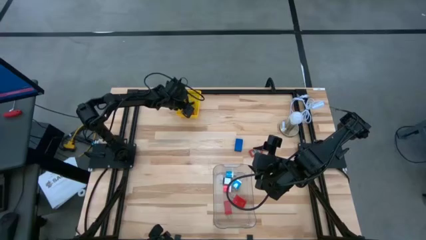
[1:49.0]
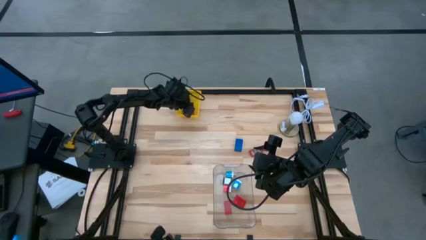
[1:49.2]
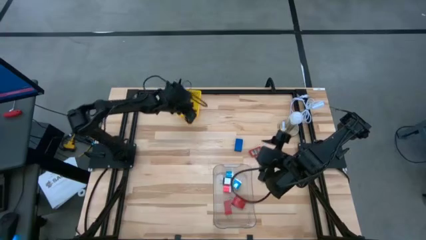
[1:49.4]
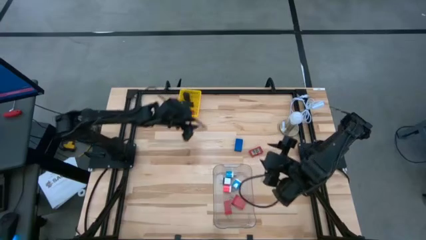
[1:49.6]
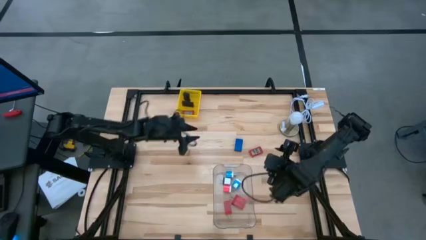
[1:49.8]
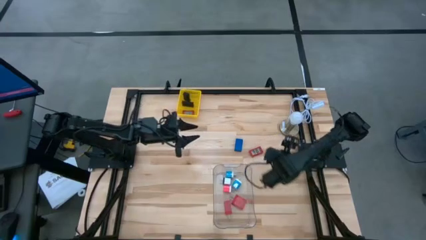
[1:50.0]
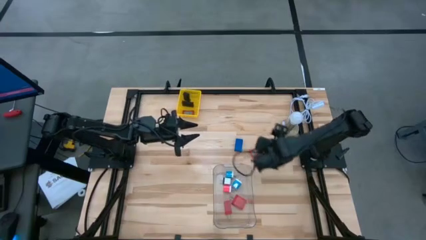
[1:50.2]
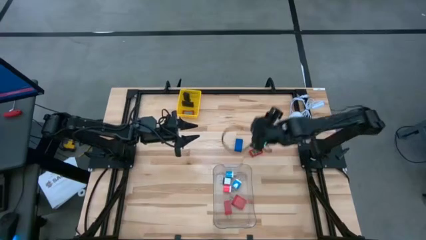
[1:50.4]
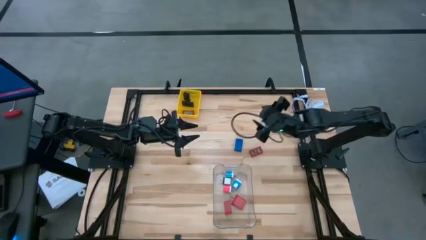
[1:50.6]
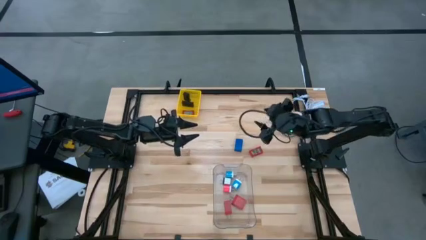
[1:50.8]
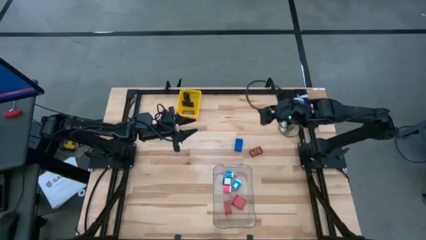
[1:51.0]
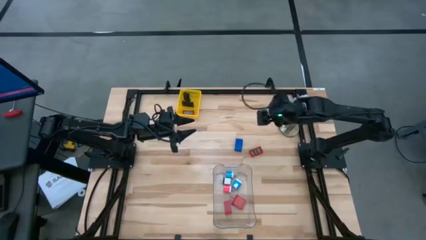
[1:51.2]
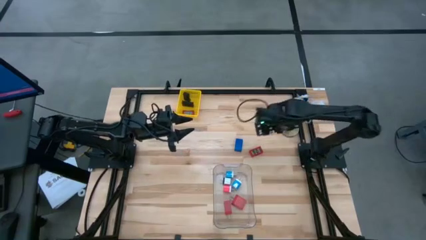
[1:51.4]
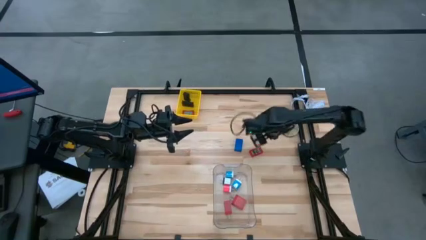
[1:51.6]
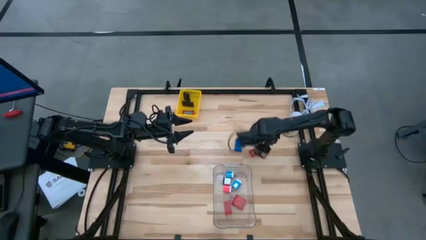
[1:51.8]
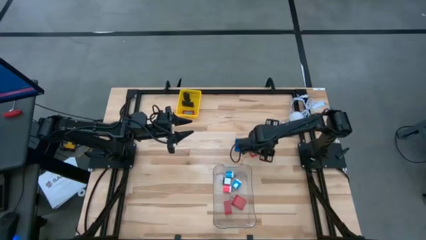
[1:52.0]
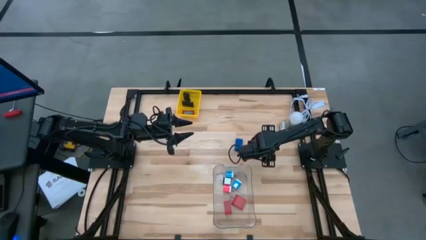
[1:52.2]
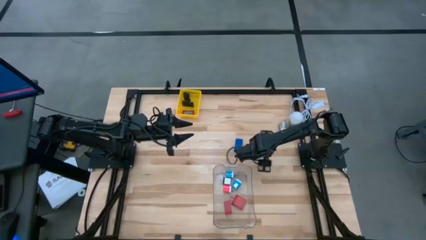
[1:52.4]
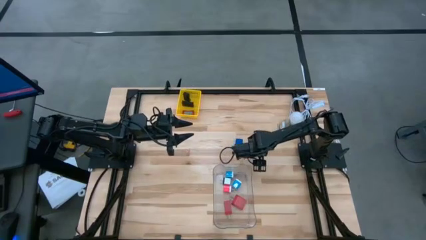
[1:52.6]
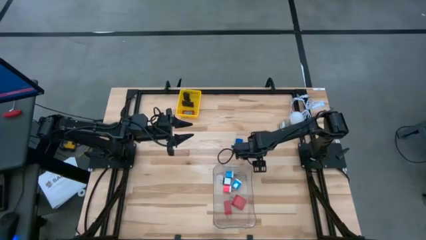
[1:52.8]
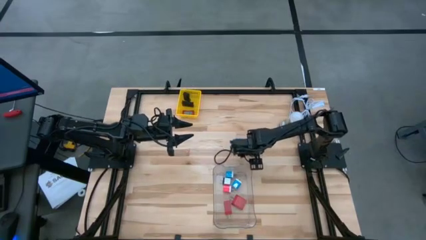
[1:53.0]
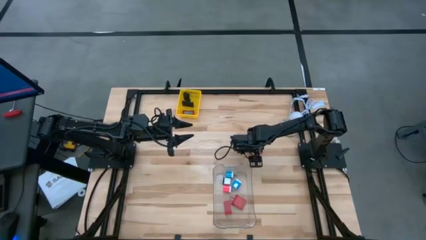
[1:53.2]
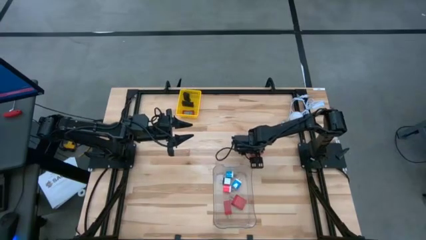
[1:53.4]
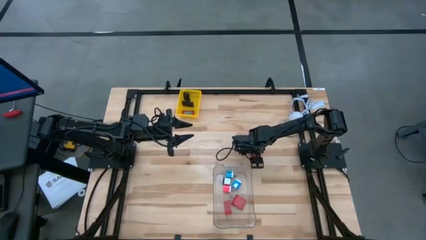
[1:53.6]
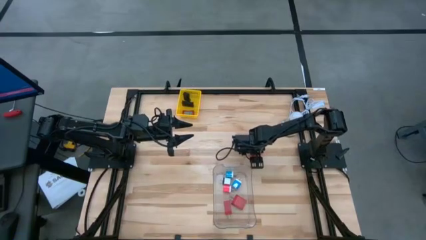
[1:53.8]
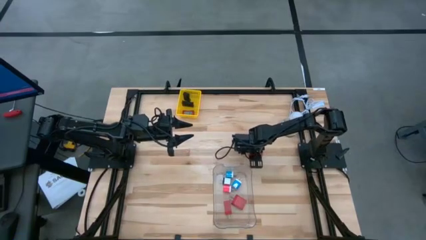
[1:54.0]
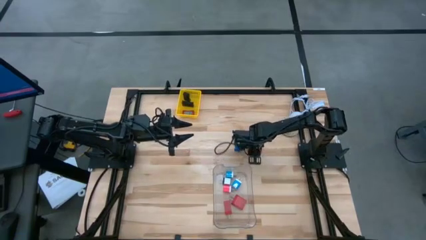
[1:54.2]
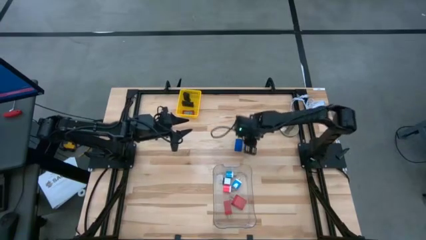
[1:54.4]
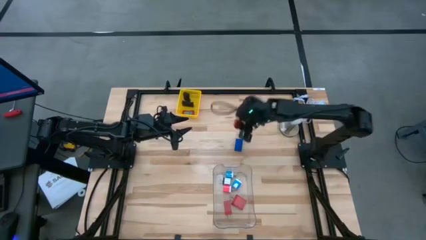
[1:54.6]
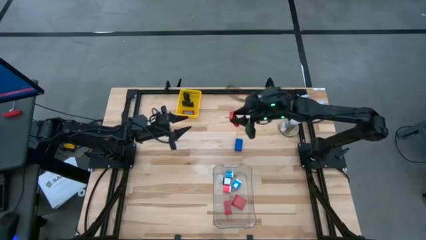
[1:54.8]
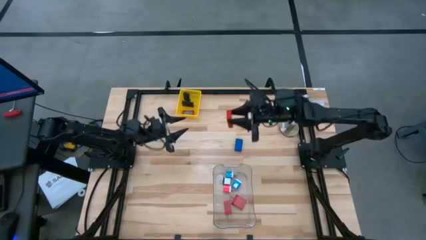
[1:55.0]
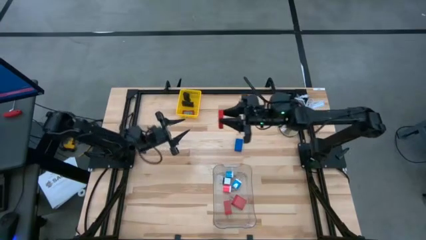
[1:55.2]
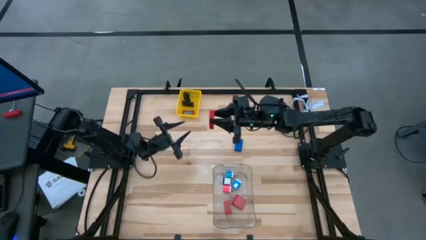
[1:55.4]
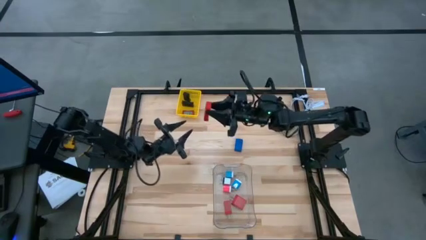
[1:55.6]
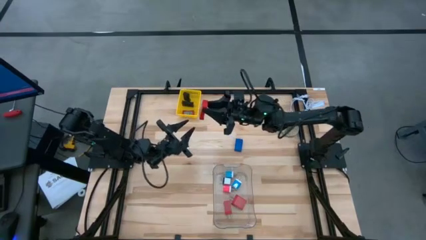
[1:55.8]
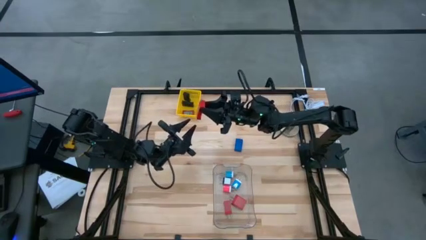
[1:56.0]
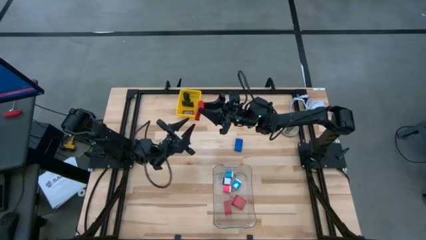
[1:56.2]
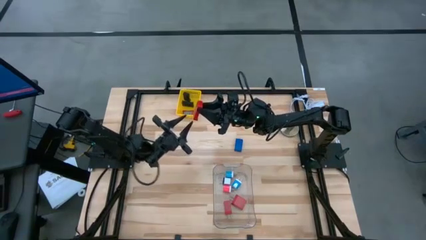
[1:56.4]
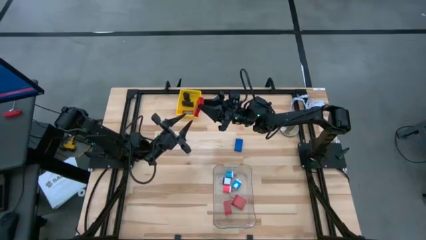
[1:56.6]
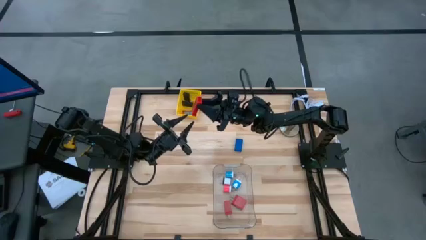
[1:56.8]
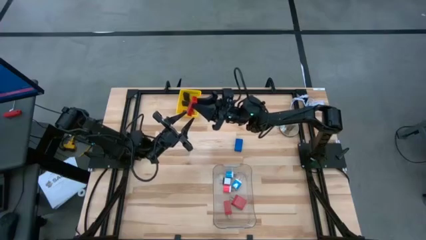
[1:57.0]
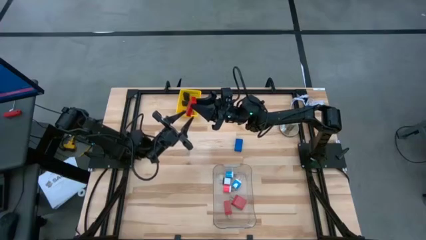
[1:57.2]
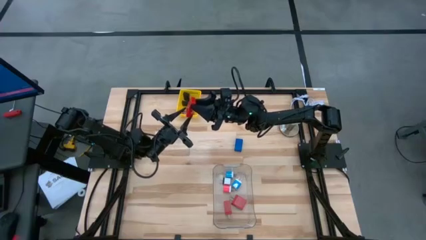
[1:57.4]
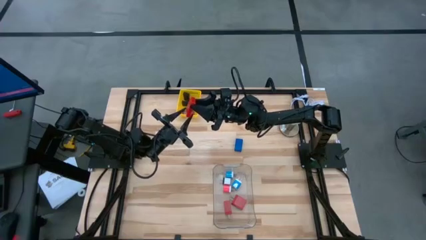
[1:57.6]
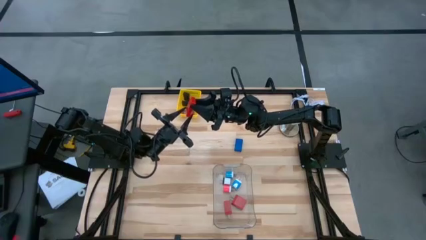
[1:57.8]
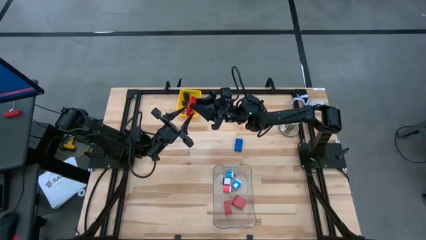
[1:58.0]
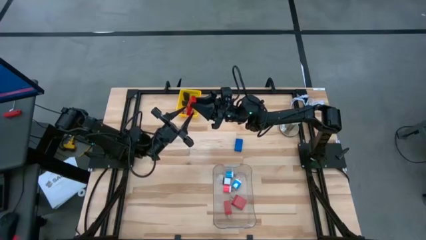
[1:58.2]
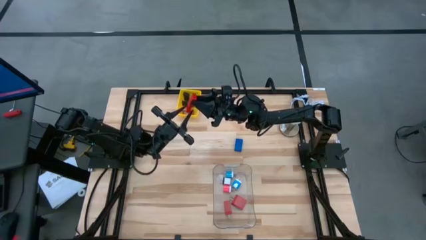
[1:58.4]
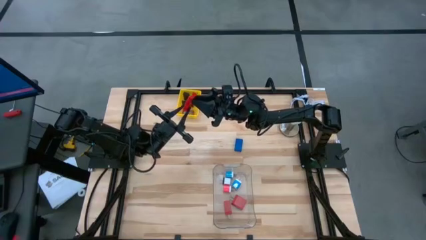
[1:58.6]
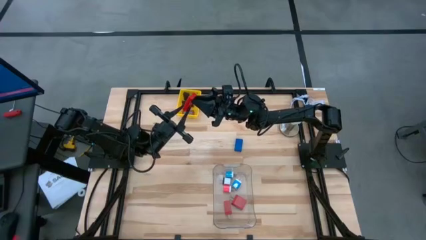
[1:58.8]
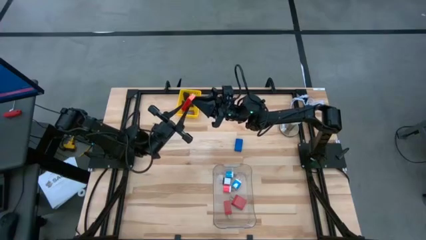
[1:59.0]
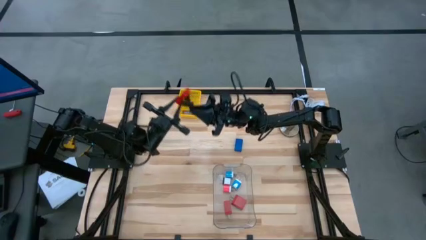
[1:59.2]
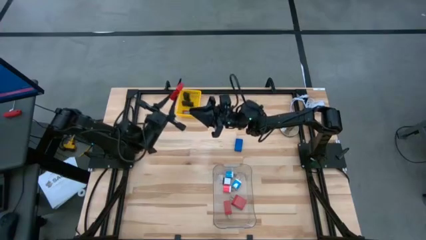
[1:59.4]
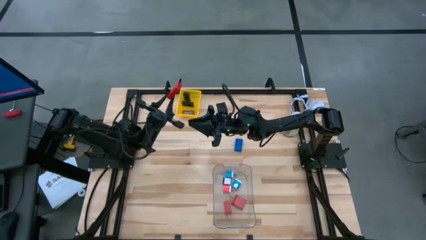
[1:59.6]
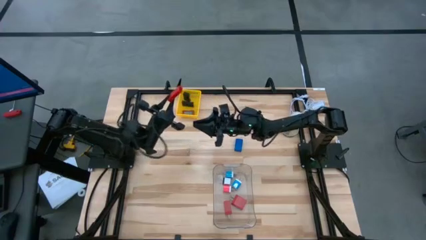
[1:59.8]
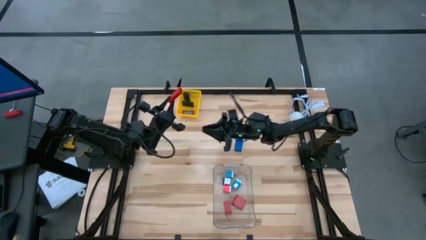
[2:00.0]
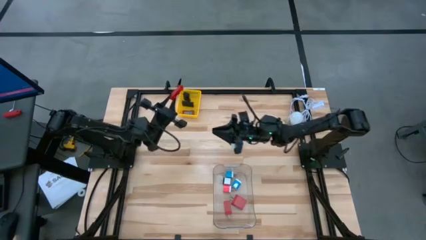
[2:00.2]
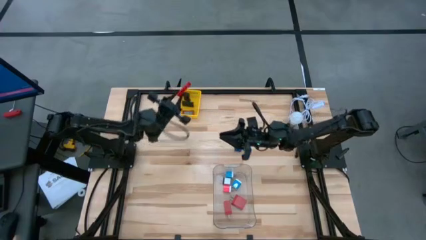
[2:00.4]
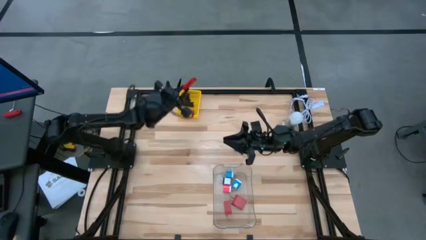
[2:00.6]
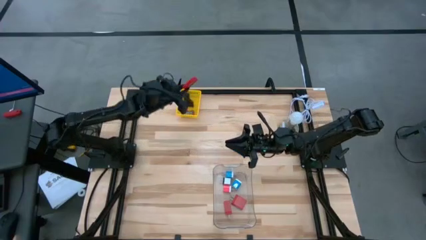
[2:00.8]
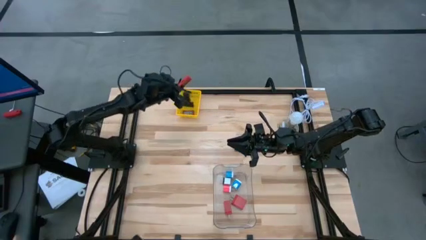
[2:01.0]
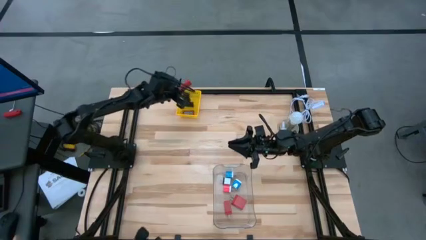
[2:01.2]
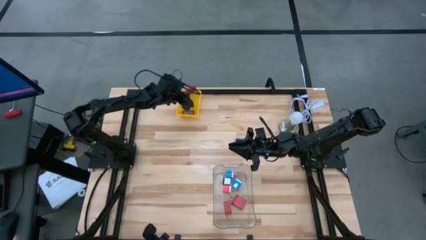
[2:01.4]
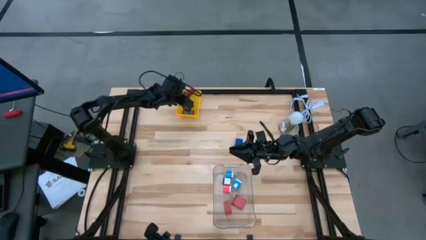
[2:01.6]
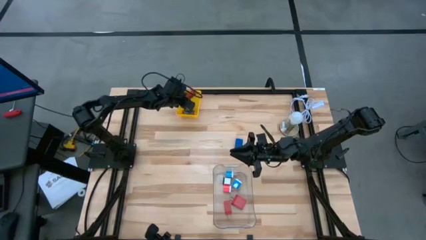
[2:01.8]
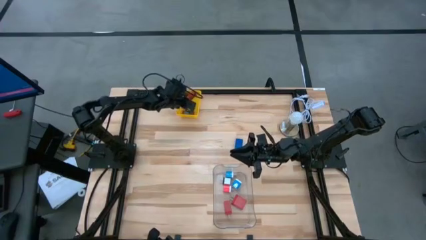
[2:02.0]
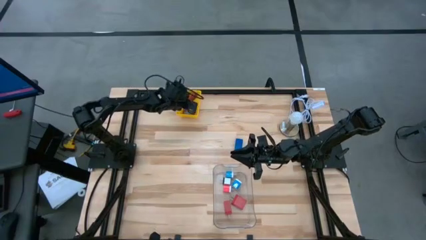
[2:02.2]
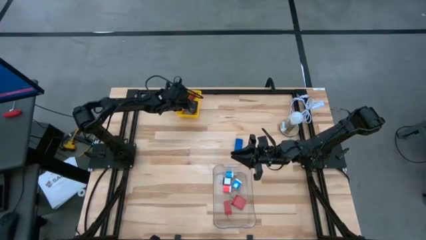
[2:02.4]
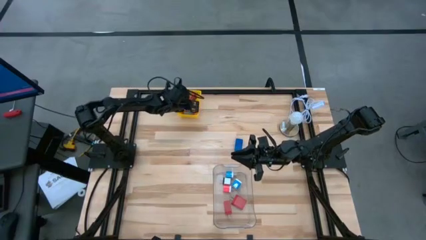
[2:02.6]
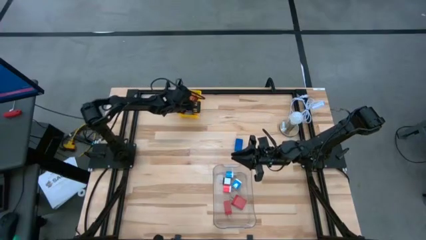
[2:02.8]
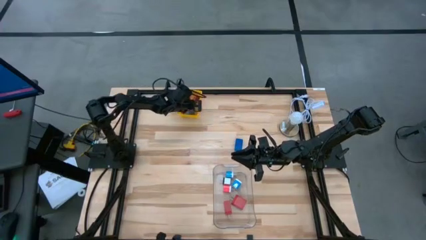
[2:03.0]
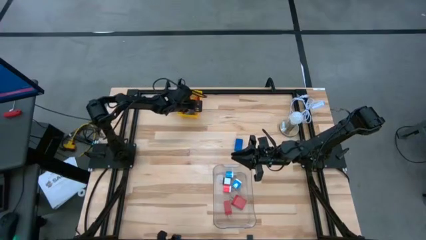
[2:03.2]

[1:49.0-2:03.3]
Task: Pick & Place Office items
Put the red digital clock into the yellow bin
